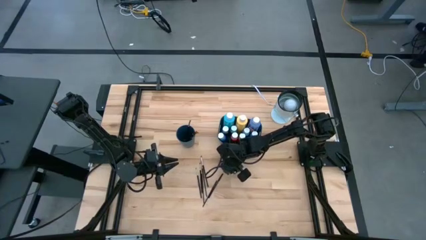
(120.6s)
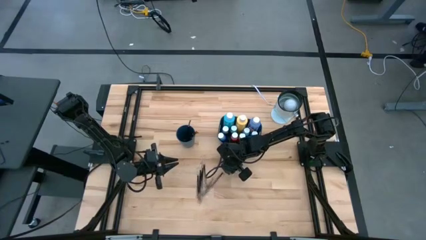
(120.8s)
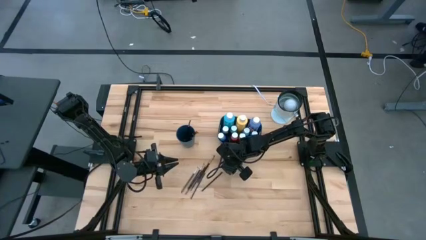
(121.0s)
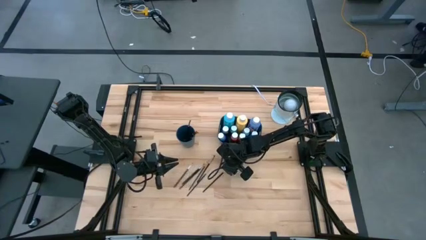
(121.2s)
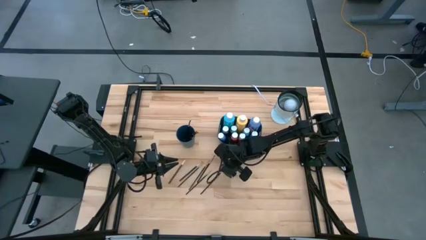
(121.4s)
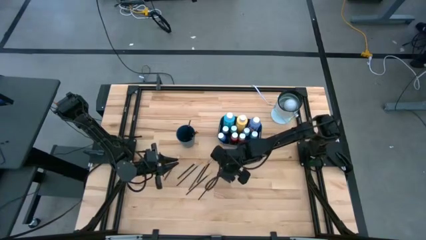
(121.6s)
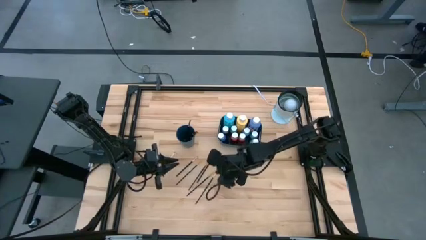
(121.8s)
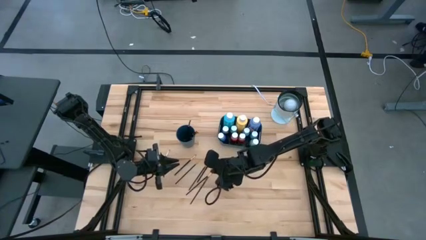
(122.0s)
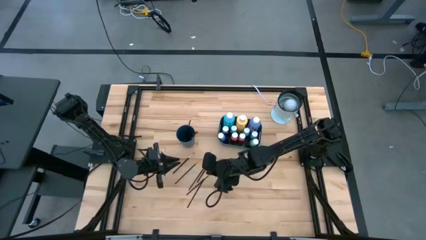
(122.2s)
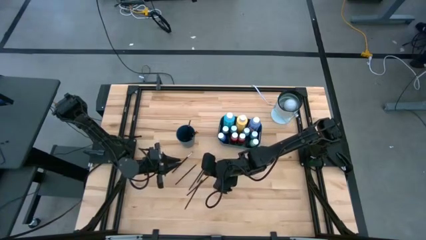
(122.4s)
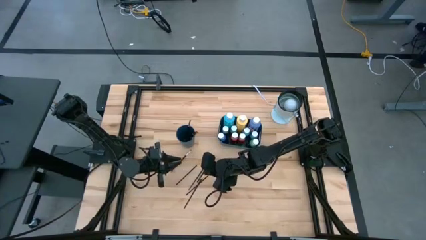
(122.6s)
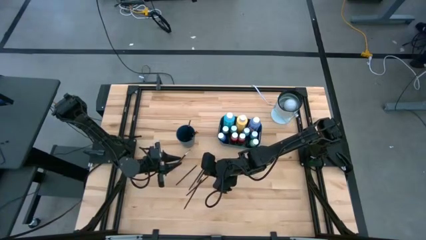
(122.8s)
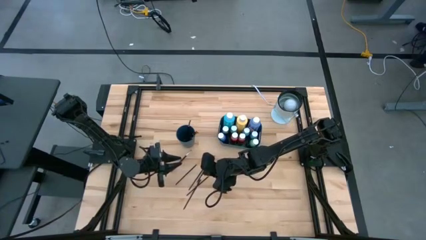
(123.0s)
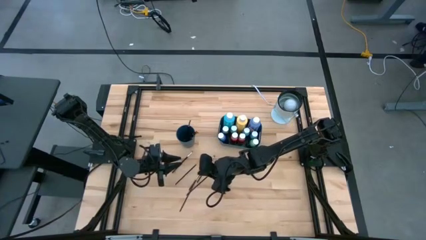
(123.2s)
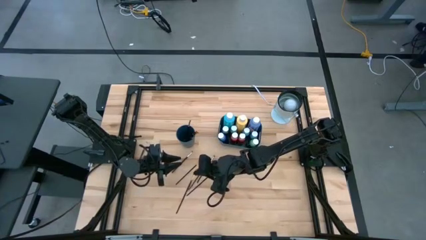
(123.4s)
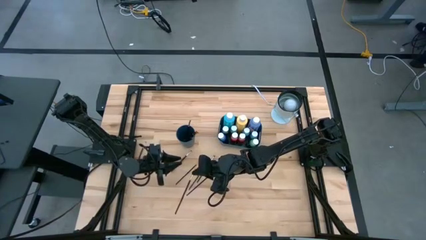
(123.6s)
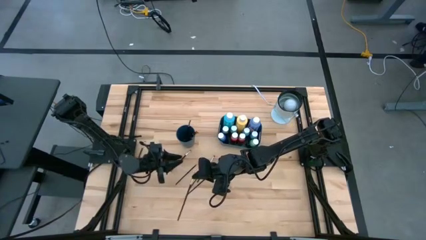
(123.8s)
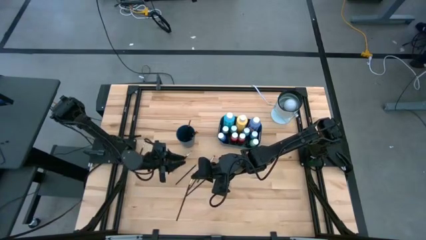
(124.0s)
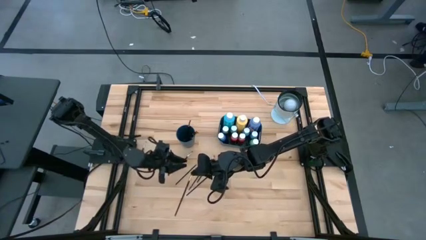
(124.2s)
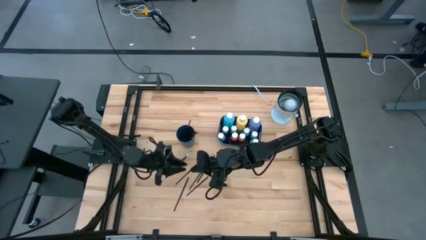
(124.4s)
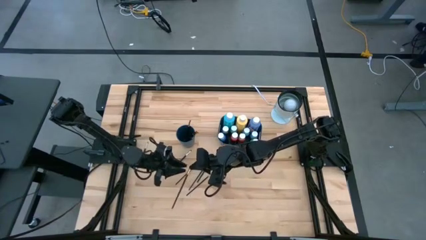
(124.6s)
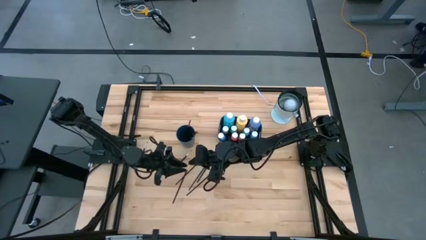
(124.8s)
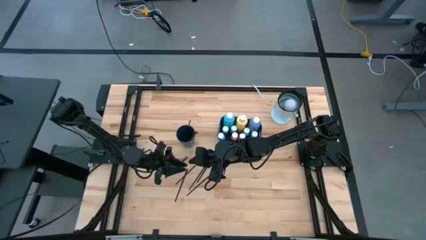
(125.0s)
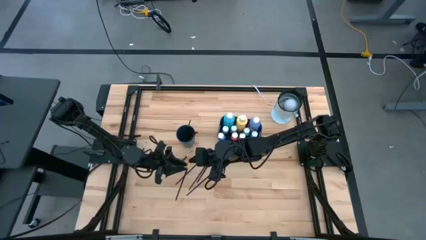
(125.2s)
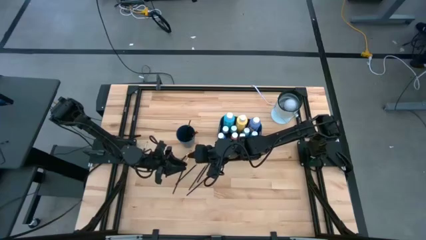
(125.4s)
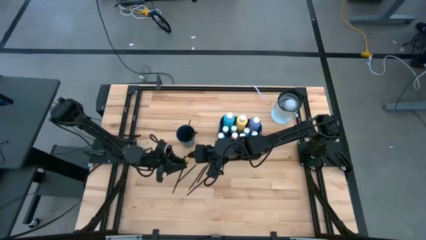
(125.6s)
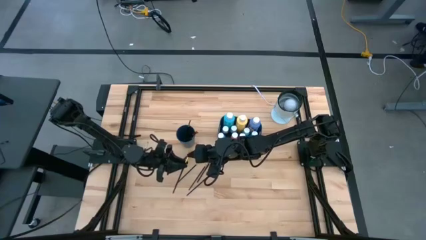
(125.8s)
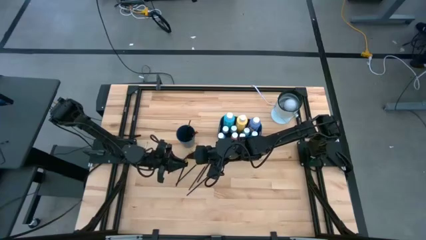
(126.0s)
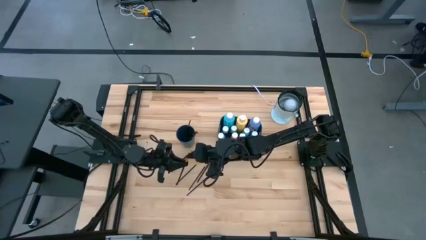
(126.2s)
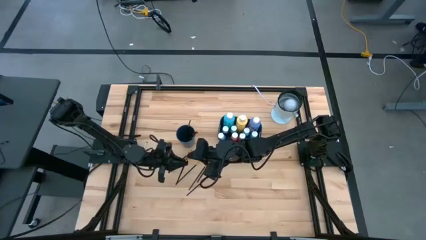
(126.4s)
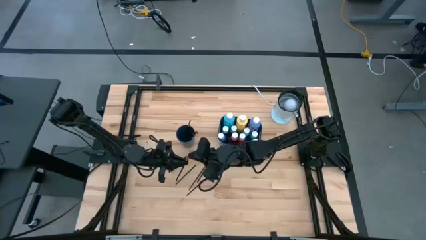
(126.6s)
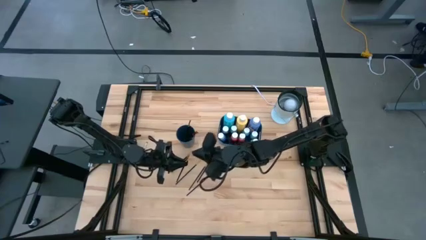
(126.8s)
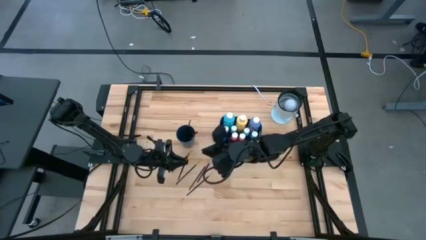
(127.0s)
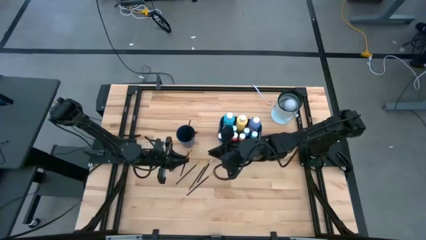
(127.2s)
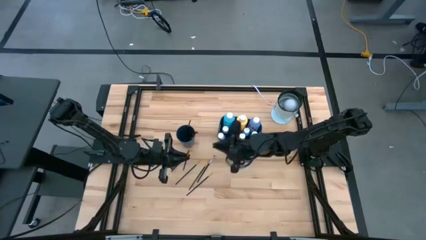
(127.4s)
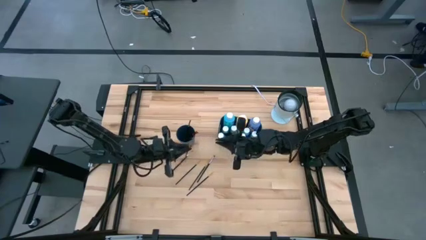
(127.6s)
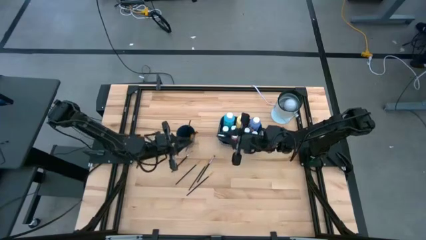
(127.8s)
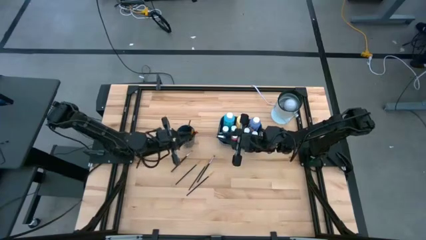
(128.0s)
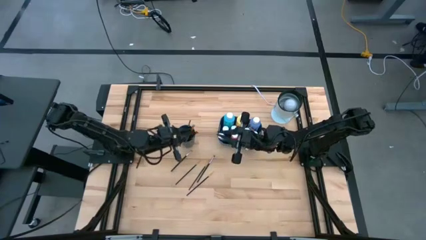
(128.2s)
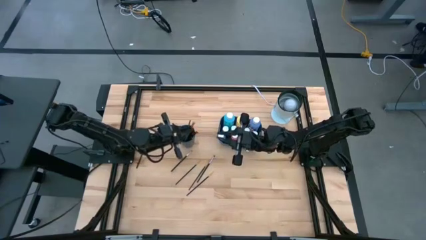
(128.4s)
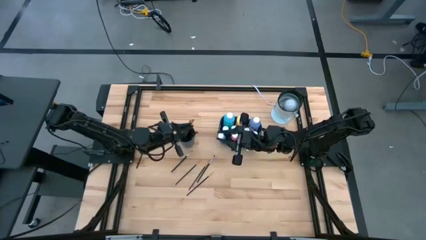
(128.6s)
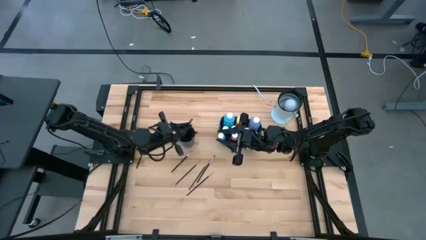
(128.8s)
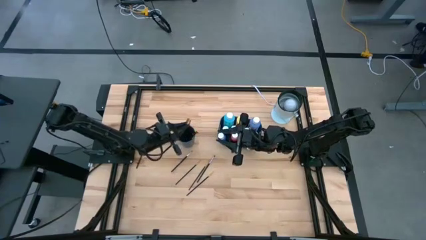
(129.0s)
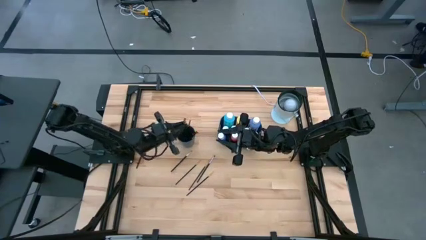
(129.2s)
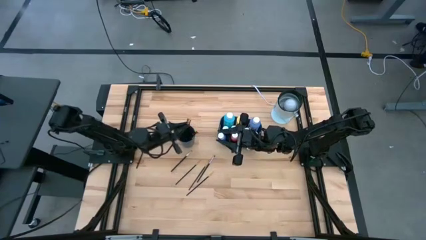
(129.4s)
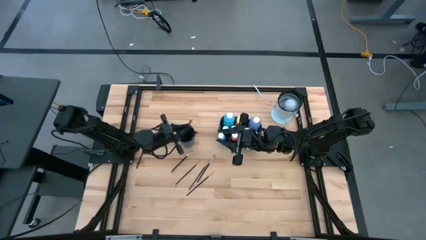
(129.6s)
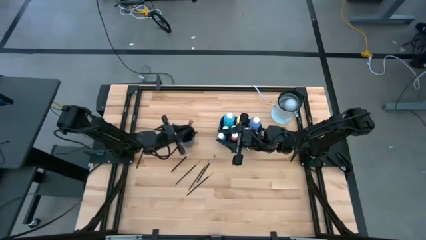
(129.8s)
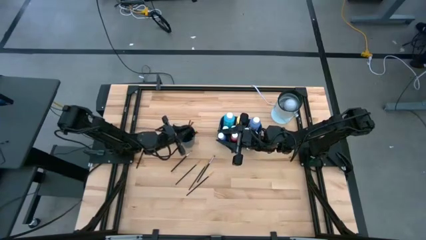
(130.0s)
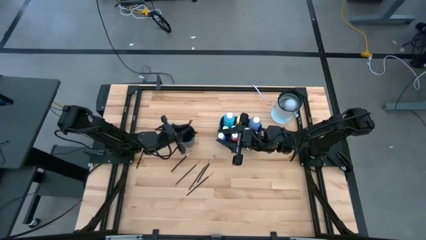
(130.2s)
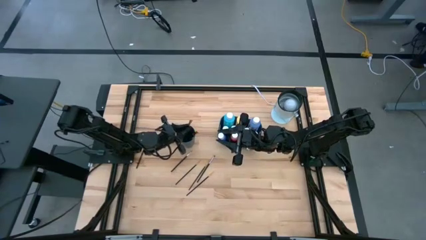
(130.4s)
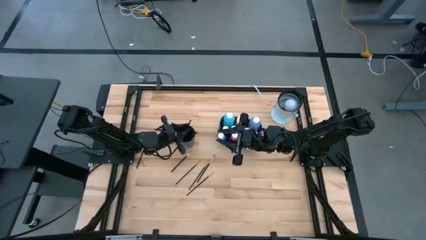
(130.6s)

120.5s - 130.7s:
Task: Pick & Place Paint Supplies
Put the gold paintbrush into the blue cup
